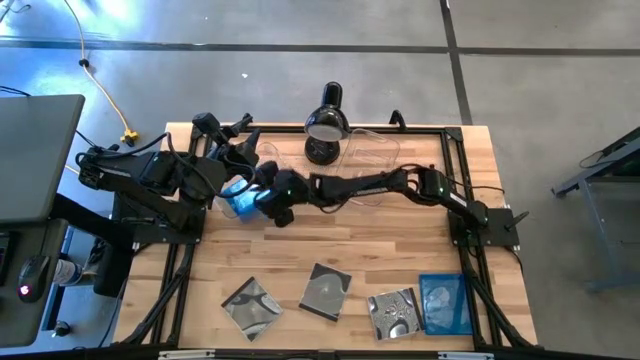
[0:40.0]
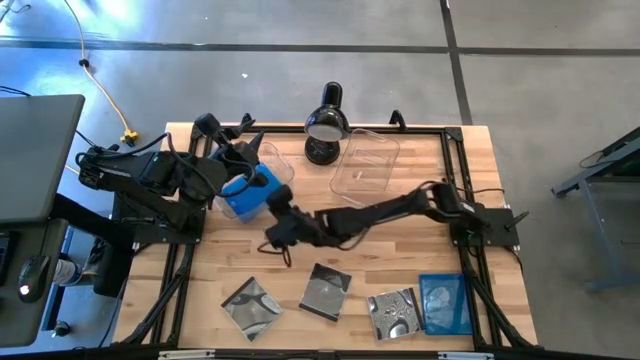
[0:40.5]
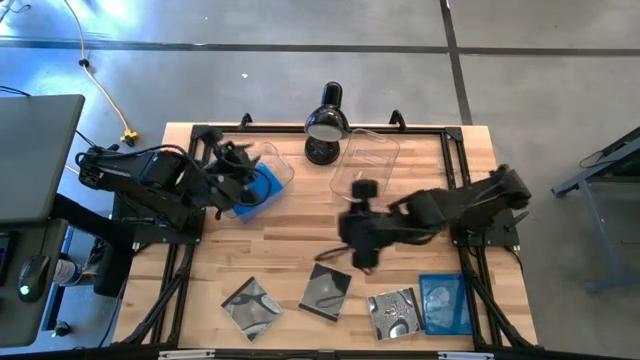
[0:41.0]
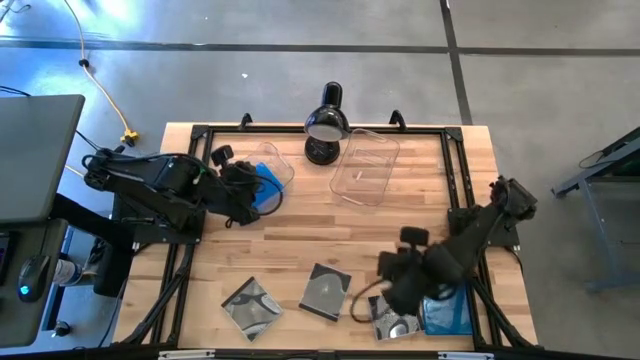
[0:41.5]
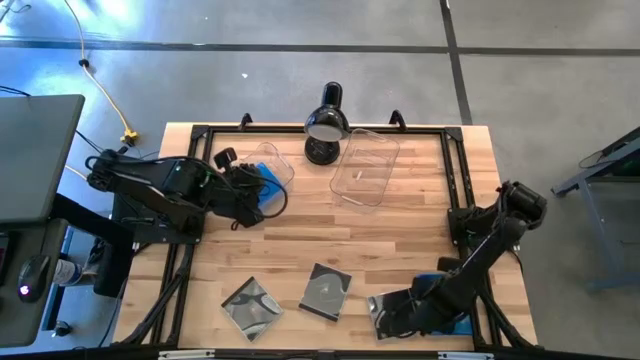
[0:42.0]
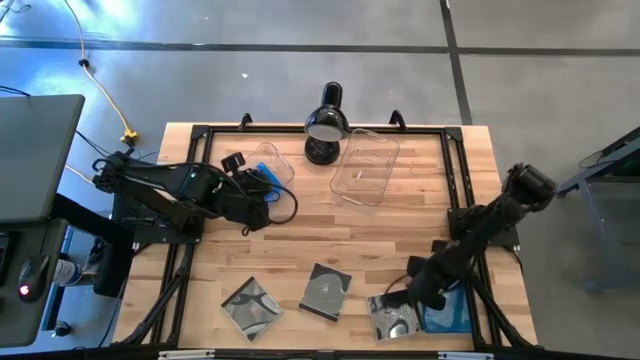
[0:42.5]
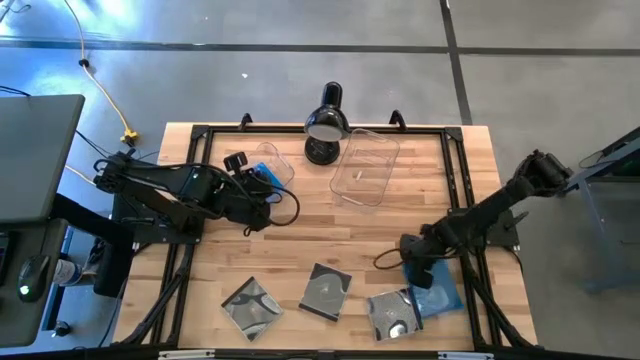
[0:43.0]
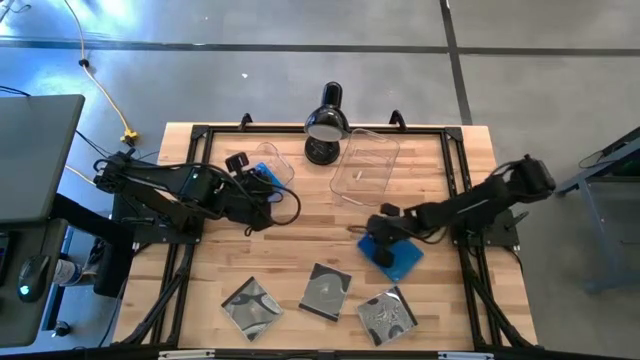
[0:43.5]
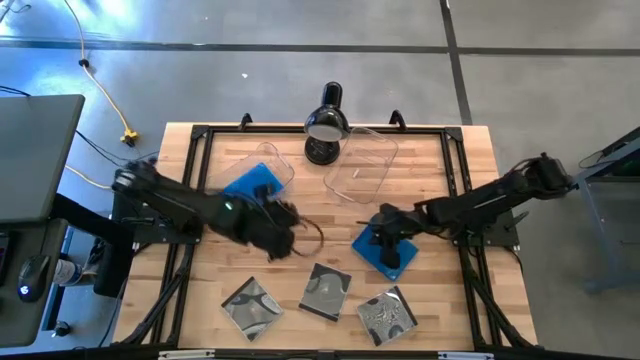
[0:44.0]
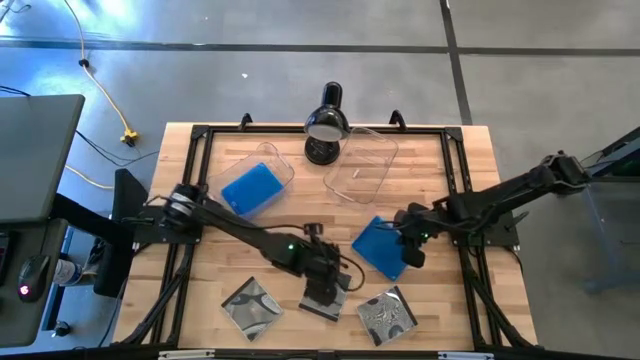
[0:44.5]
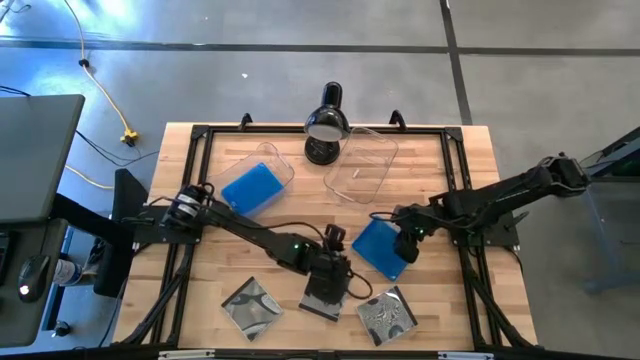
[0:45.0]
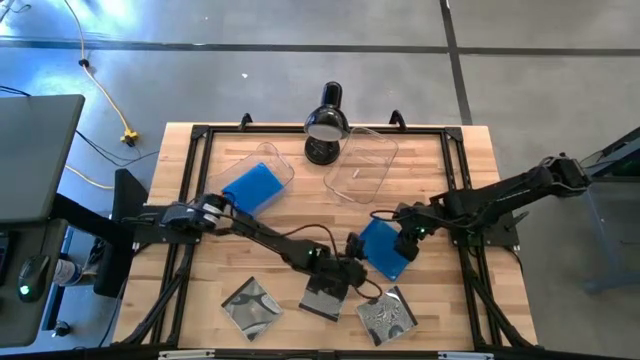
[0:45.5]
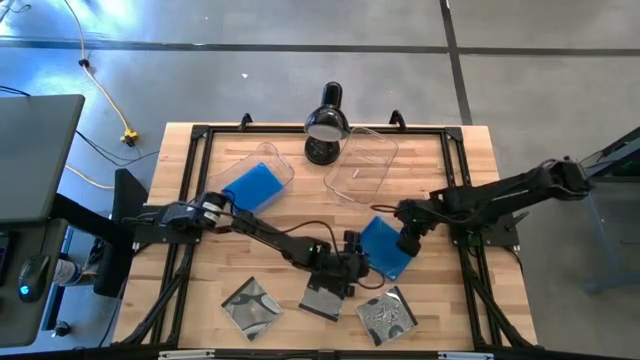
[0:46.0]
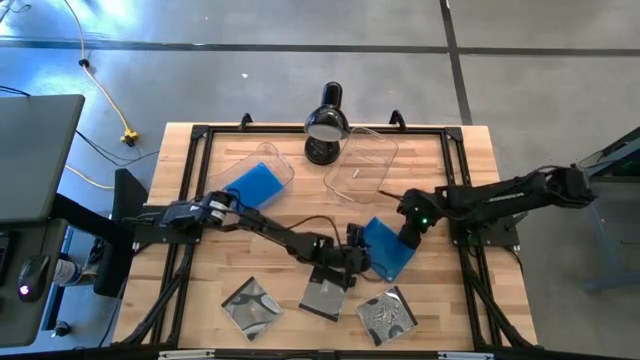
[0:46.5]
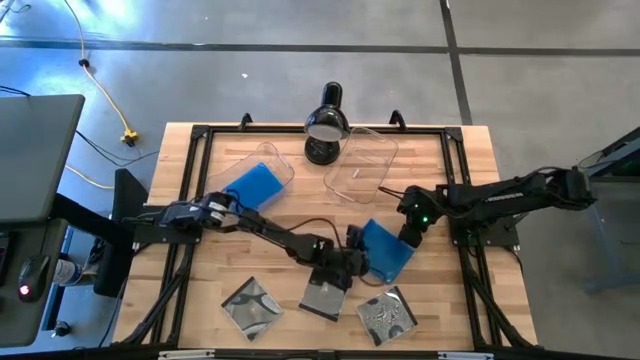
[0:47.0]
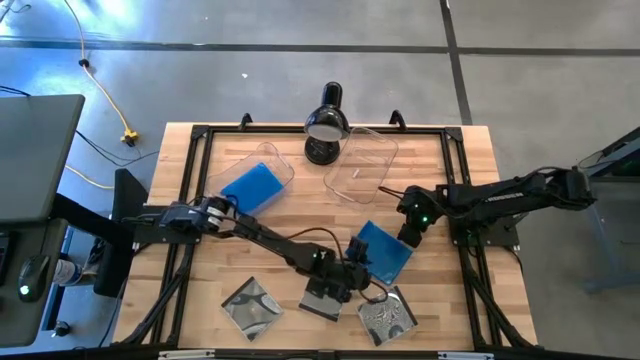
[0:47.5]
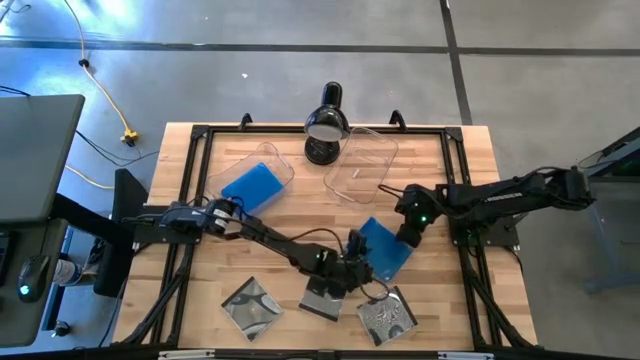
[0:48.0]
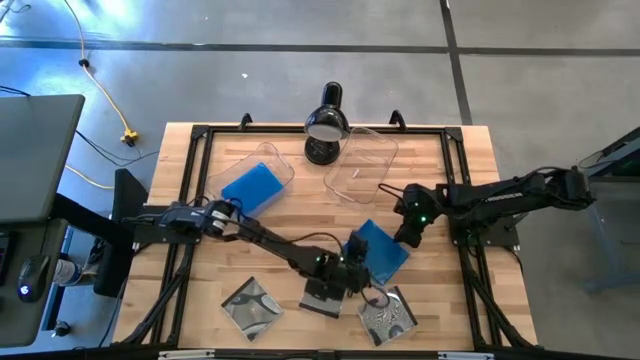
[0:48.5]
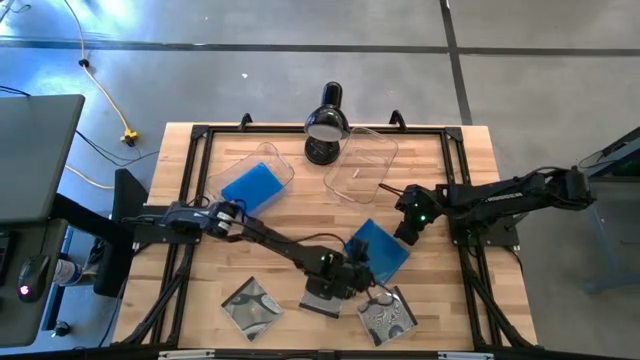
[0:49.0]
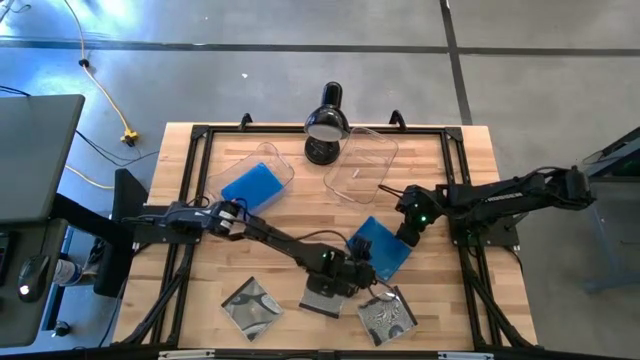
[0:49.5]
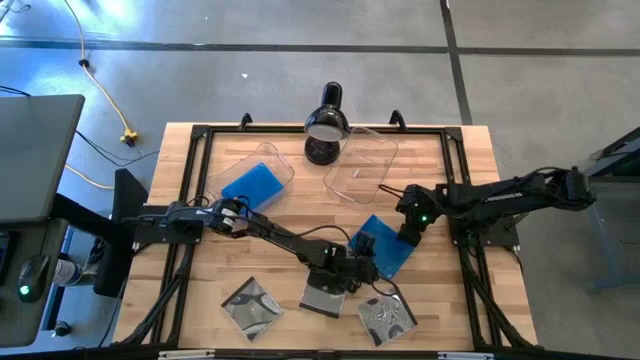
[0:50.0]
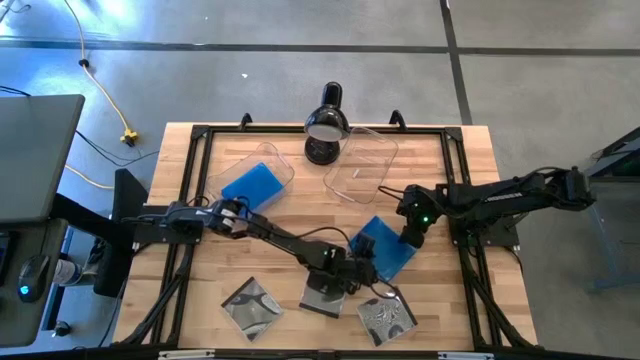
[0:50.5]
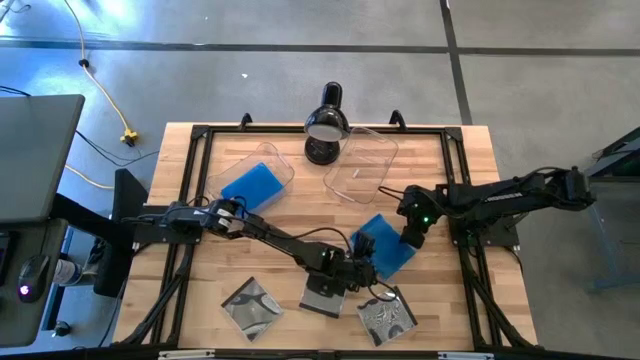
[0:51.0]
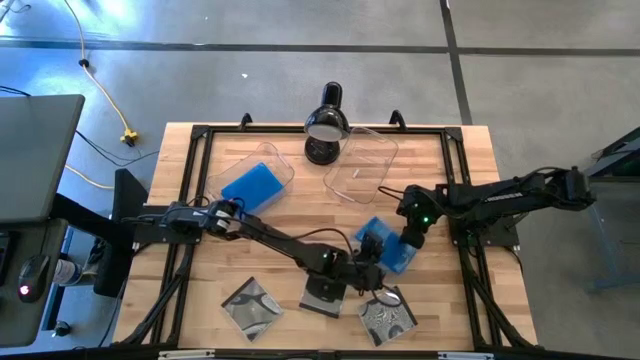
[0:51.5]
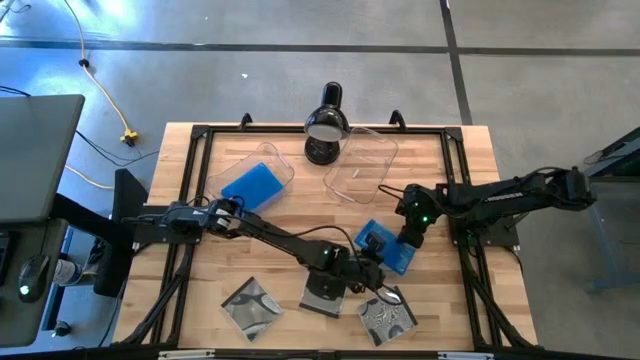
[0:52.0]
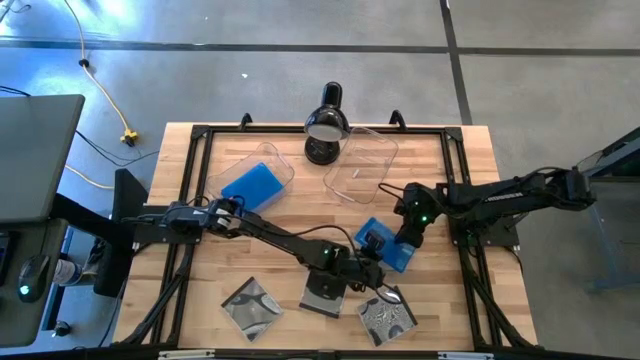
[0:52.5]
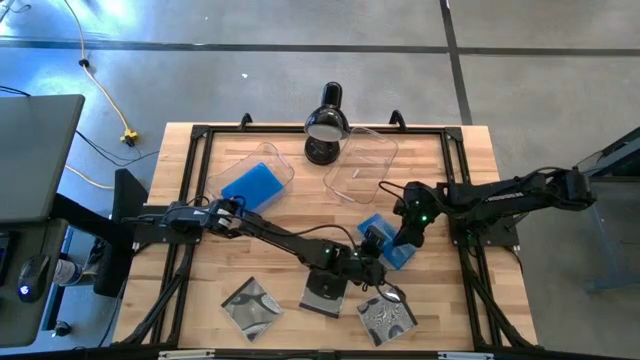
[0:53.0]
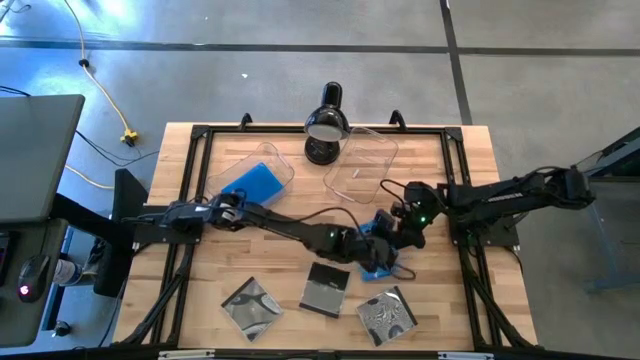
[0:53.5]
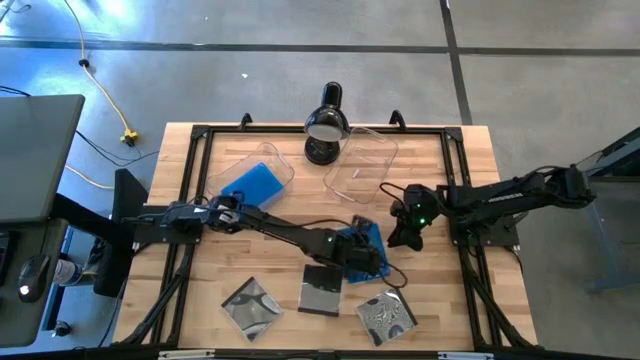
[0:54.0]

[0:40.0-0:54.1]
Task: Pick & place jewel cases by type
Put the blue CD case into the left transparent bin

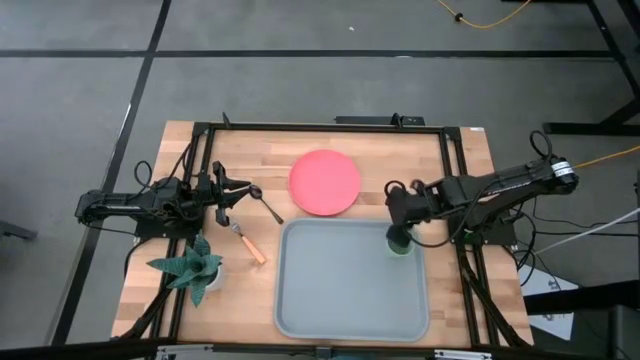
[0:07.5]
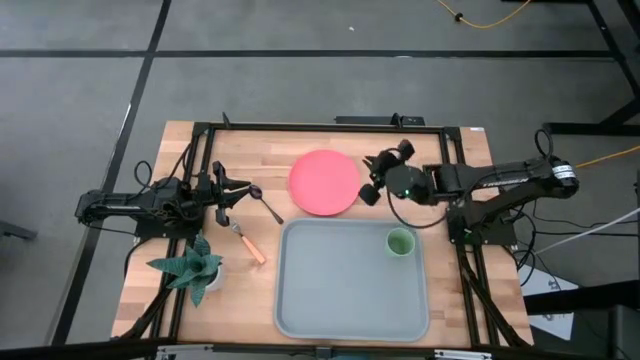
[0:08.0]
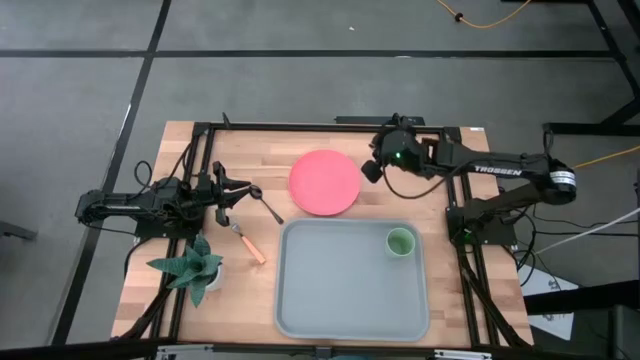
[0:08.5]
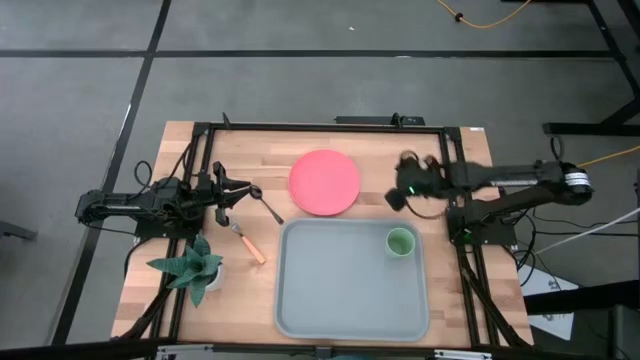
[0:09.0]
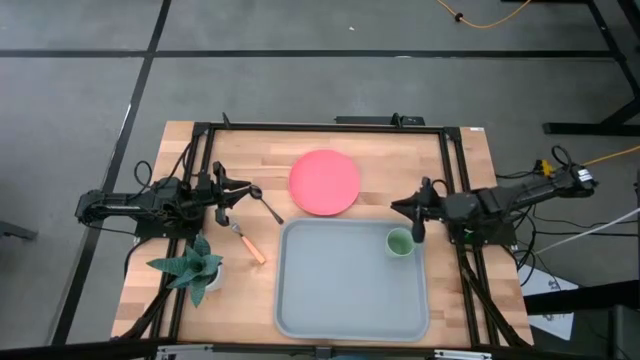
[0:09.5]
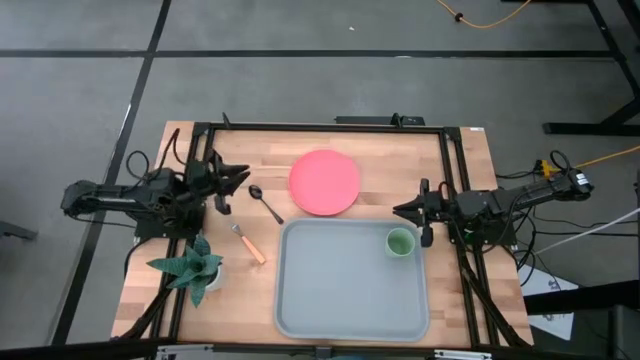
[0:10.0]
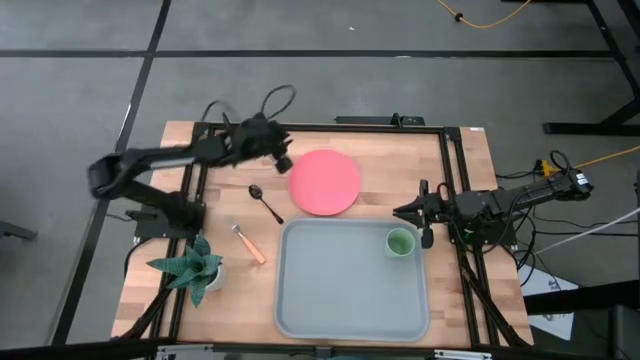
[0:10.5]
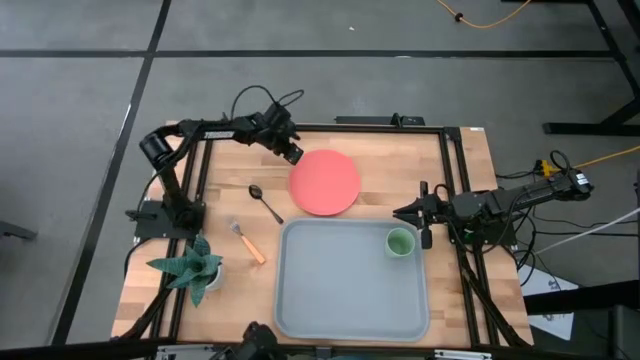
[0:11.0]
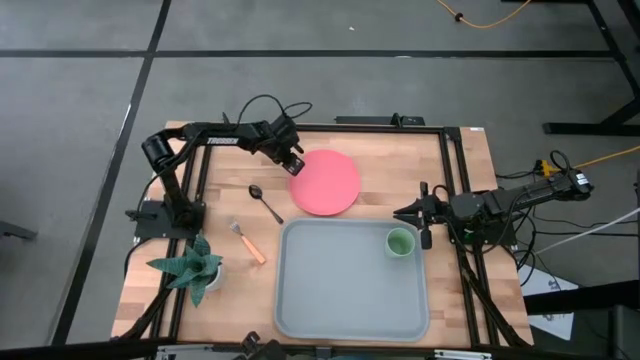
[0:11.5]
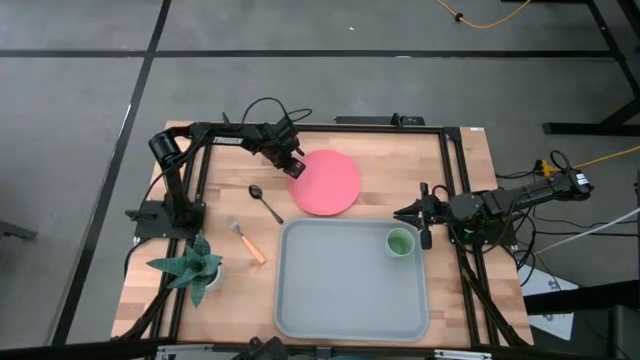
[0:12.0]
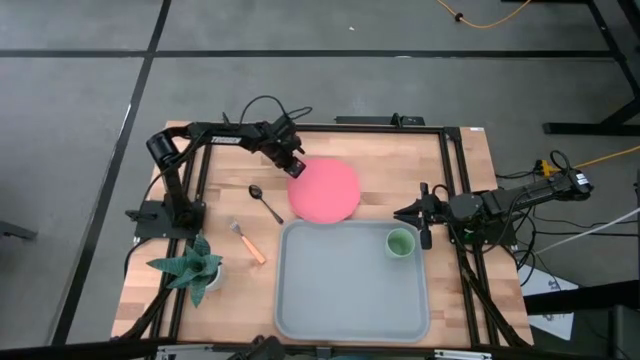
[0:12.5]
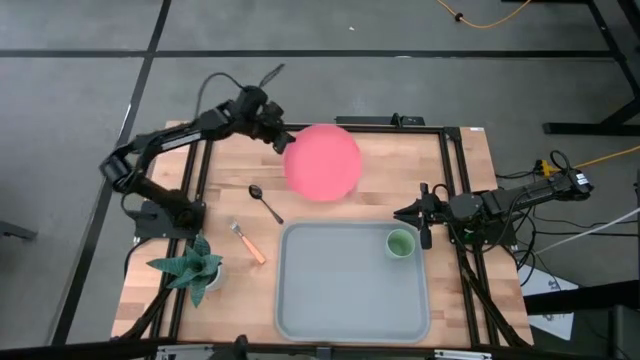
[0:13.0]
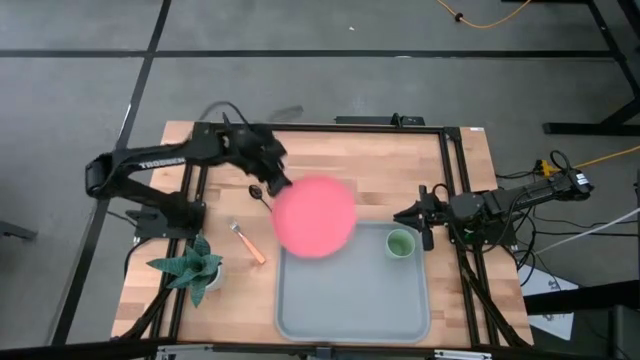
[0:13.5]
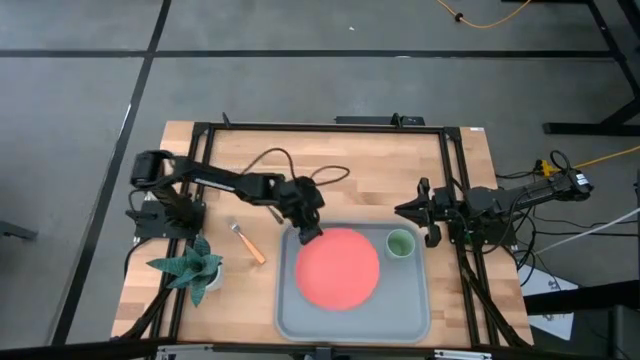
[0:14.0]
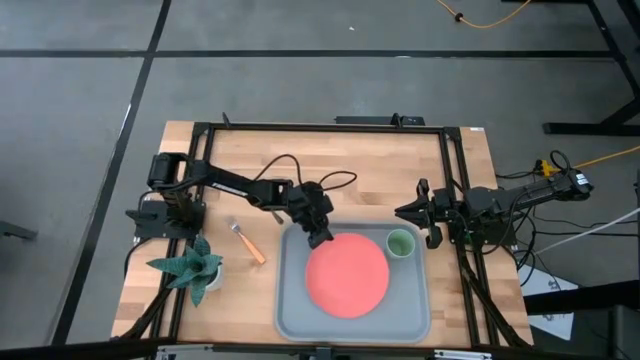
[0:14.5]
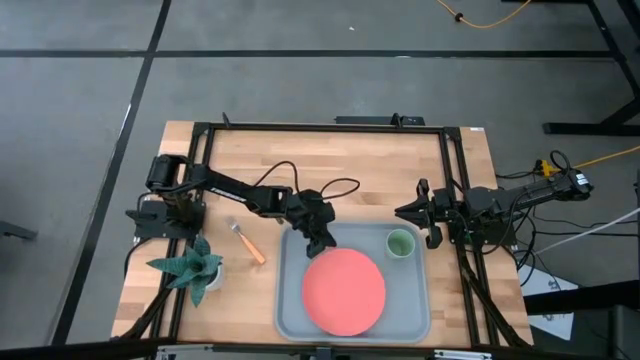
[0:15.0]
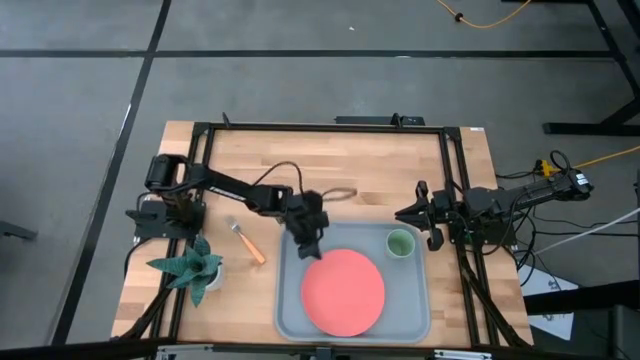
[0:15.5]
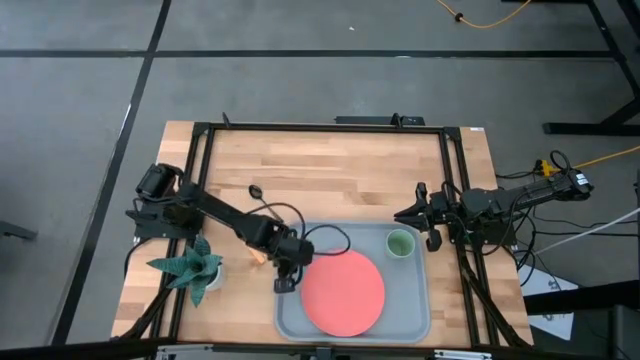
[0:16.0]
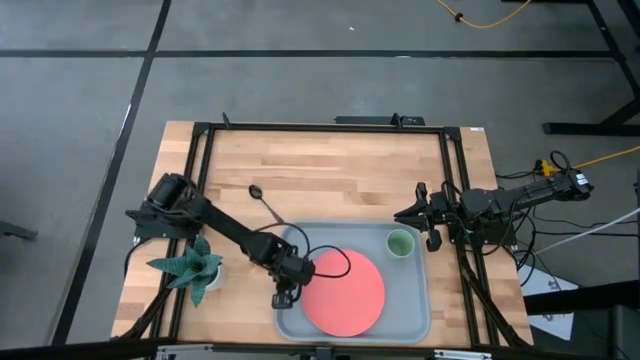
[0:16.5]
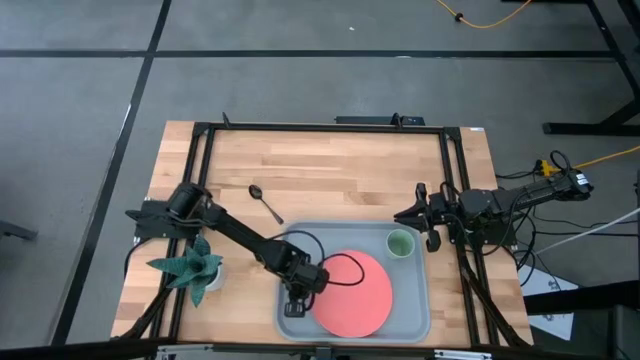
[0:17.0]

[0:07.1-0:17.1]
Task: Pick and place plate/cup/fork/spoon on tray
Put the pink plate on the gray serving tray
